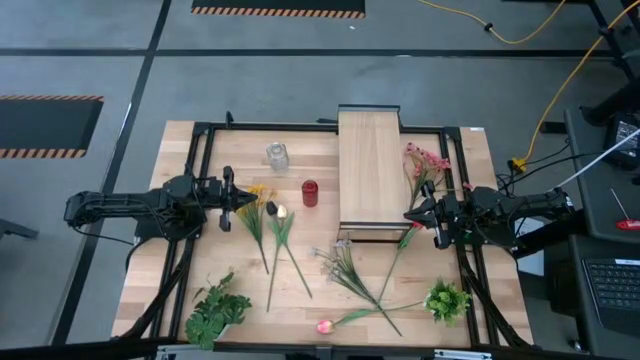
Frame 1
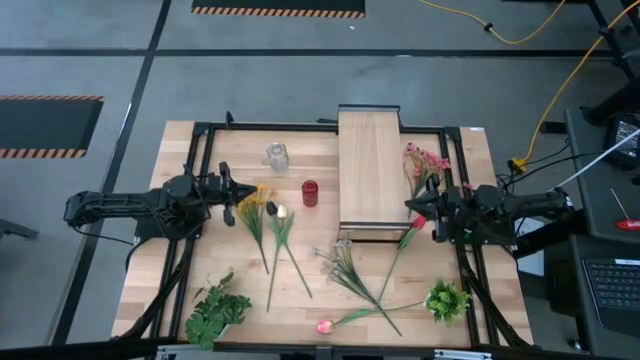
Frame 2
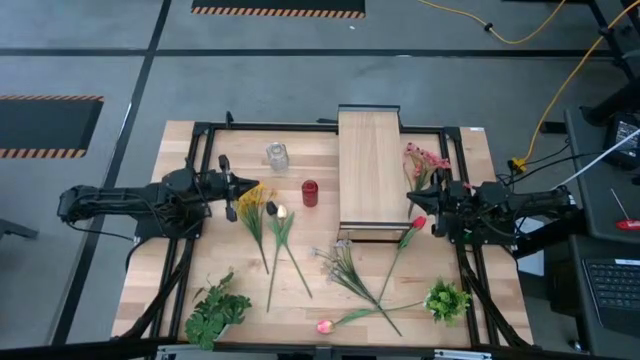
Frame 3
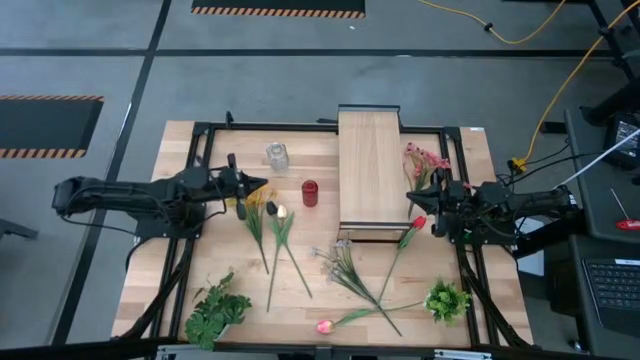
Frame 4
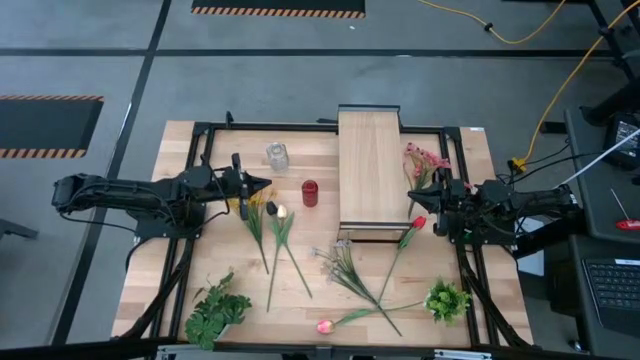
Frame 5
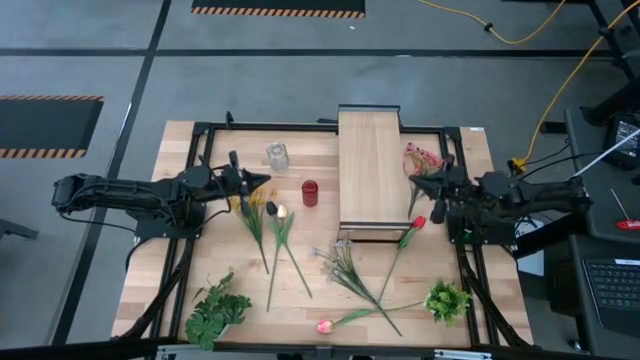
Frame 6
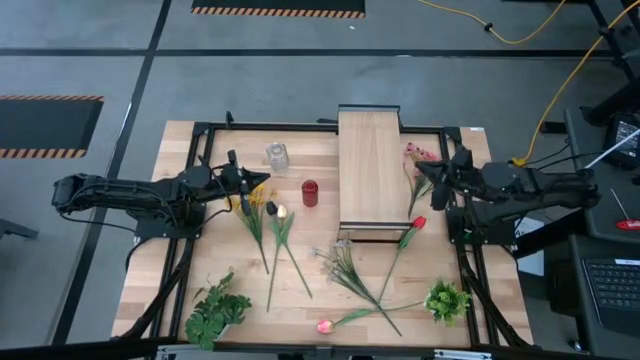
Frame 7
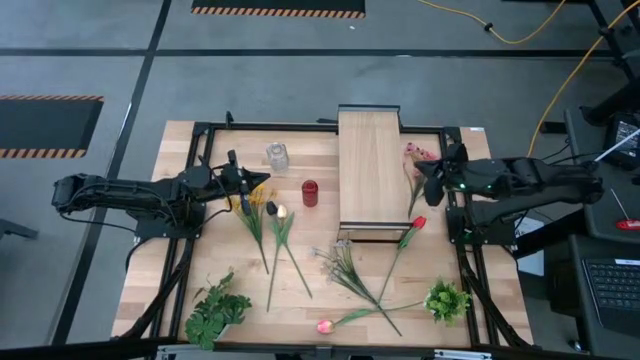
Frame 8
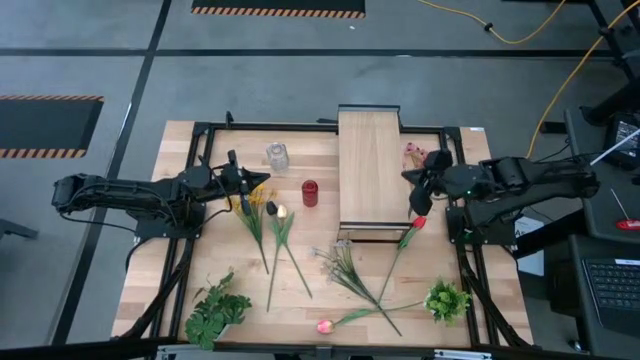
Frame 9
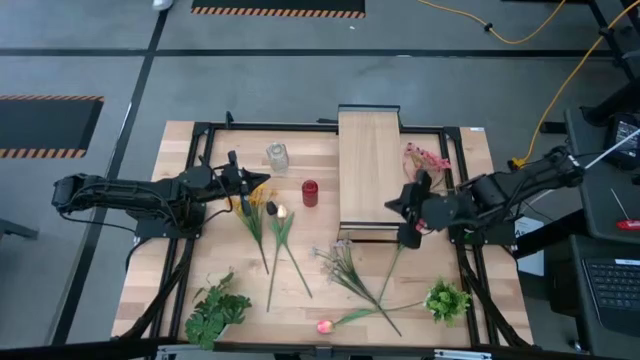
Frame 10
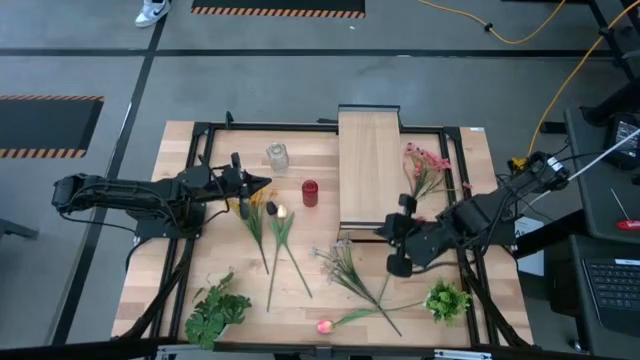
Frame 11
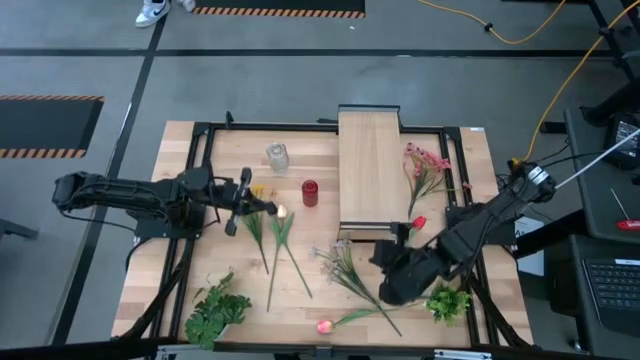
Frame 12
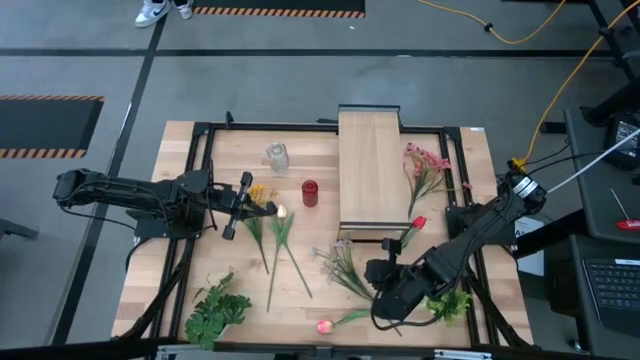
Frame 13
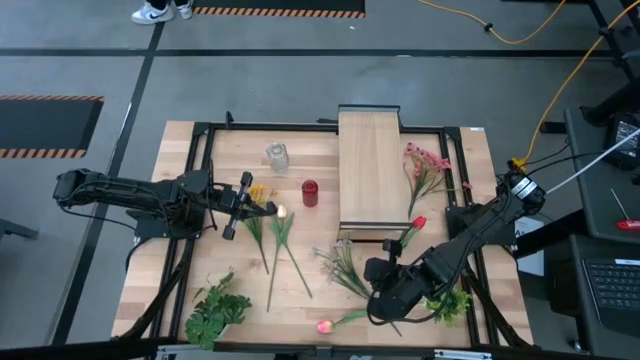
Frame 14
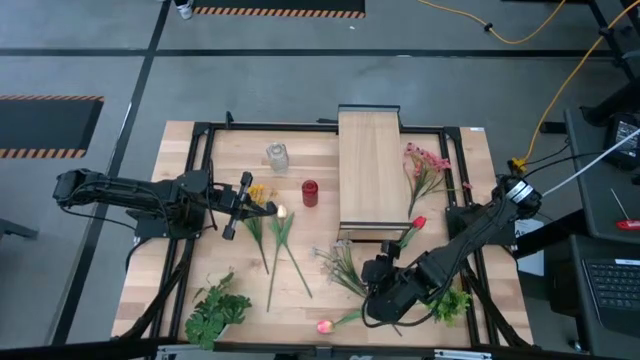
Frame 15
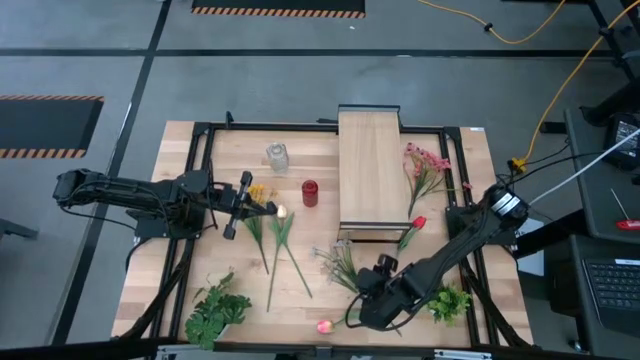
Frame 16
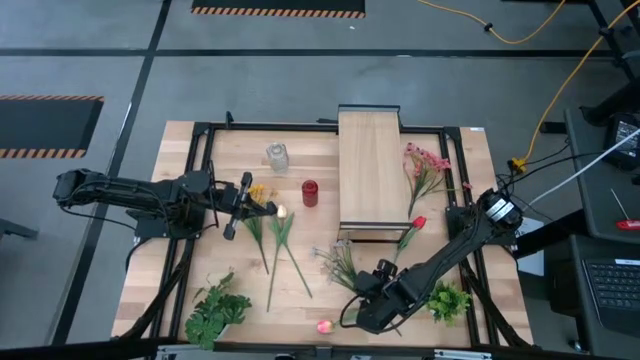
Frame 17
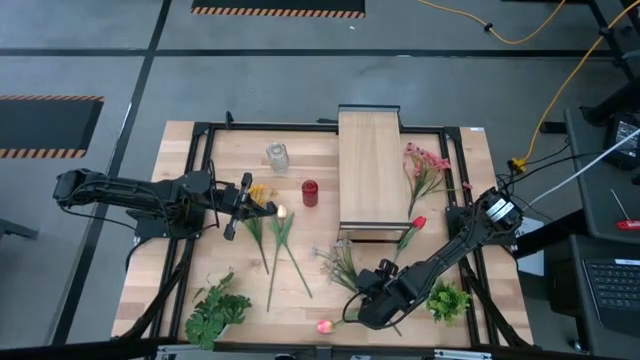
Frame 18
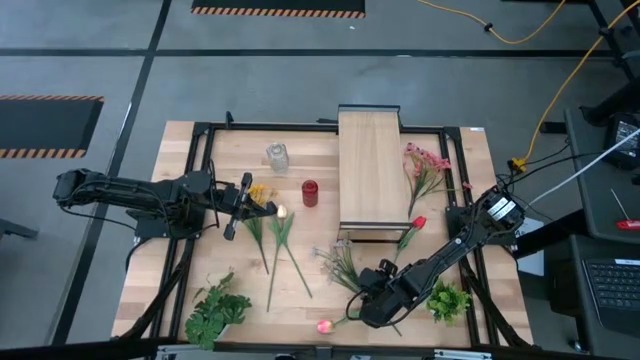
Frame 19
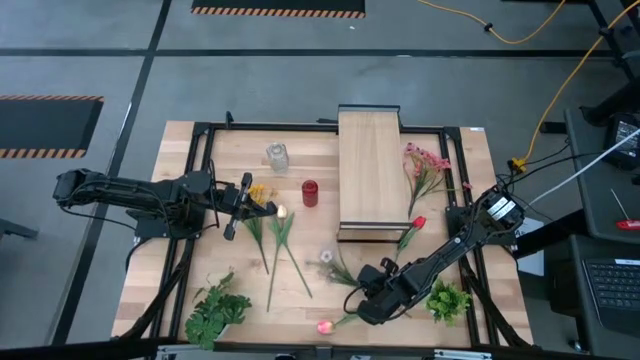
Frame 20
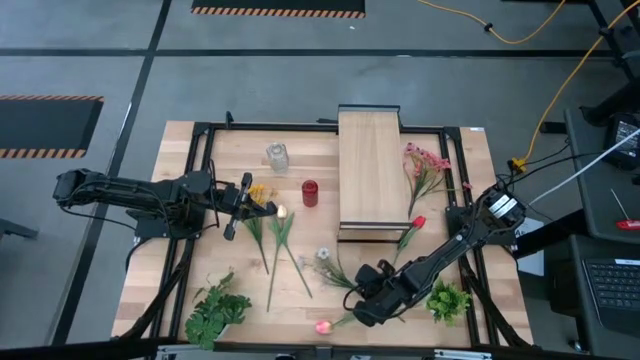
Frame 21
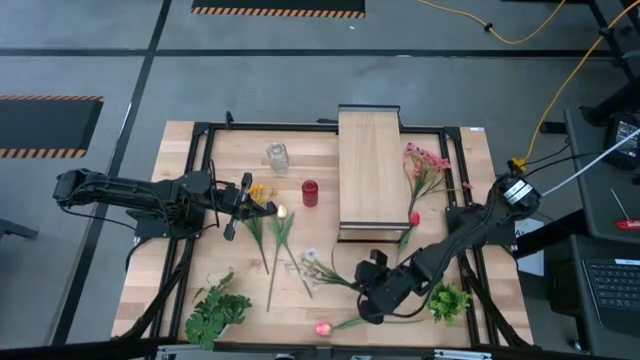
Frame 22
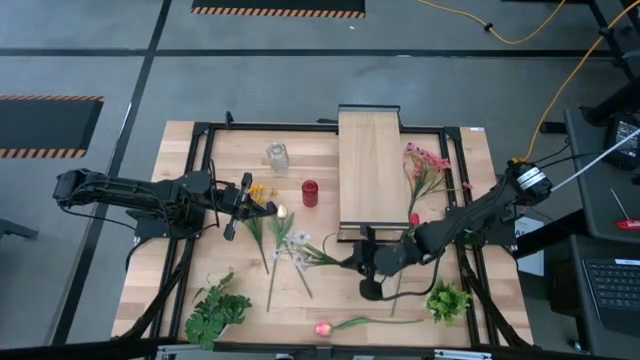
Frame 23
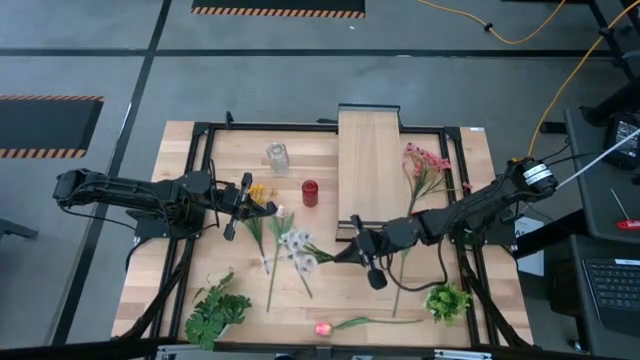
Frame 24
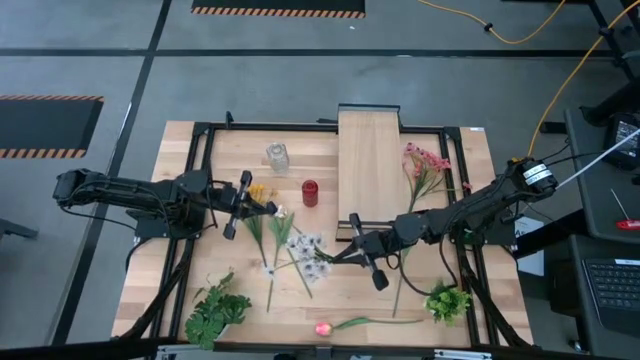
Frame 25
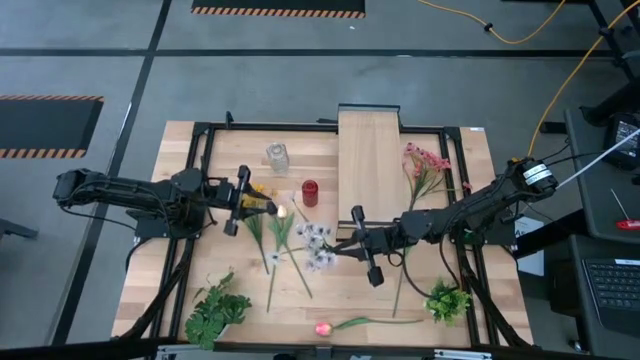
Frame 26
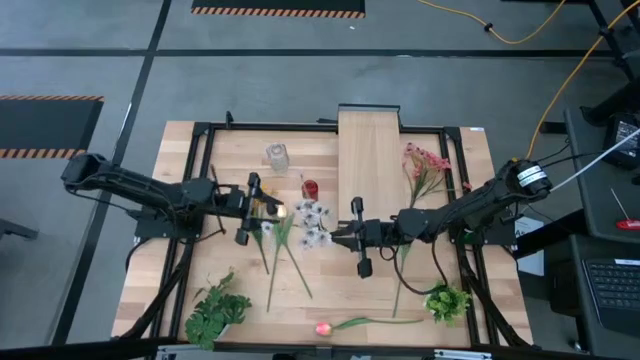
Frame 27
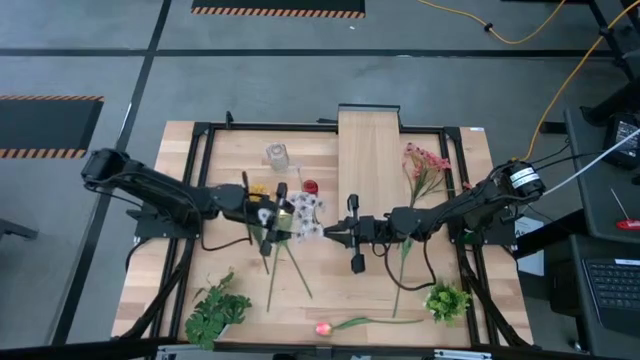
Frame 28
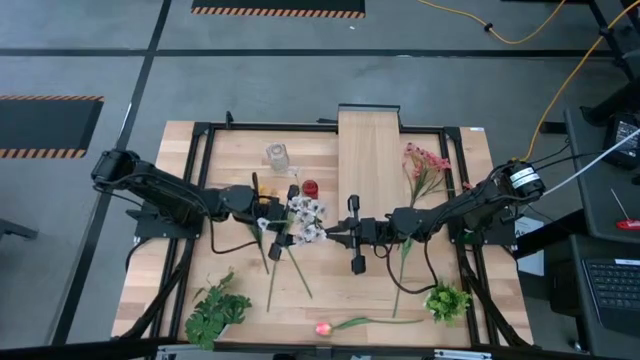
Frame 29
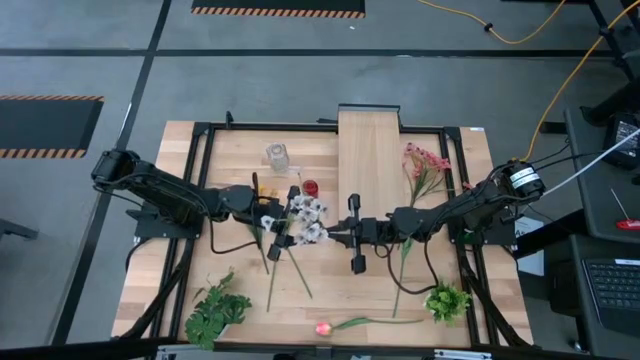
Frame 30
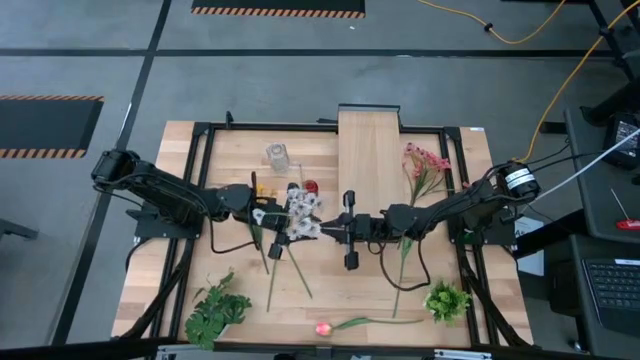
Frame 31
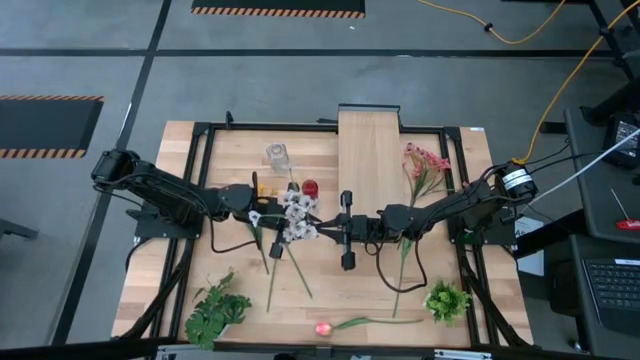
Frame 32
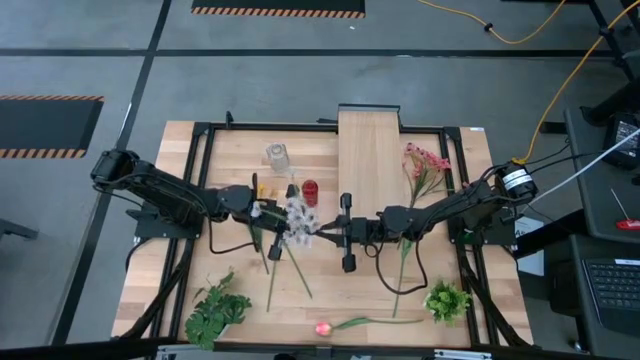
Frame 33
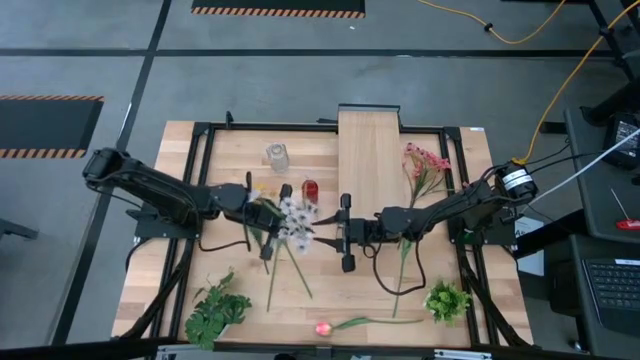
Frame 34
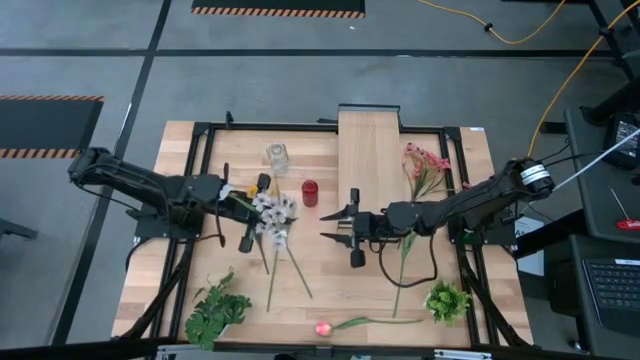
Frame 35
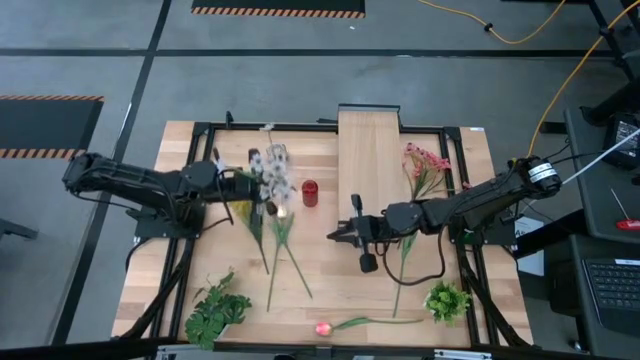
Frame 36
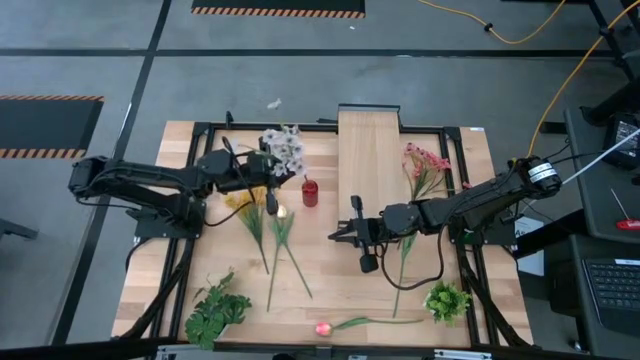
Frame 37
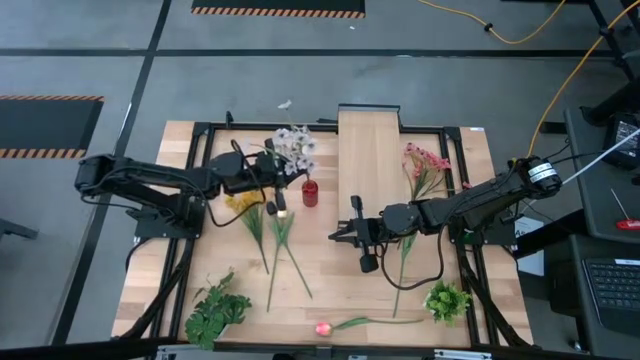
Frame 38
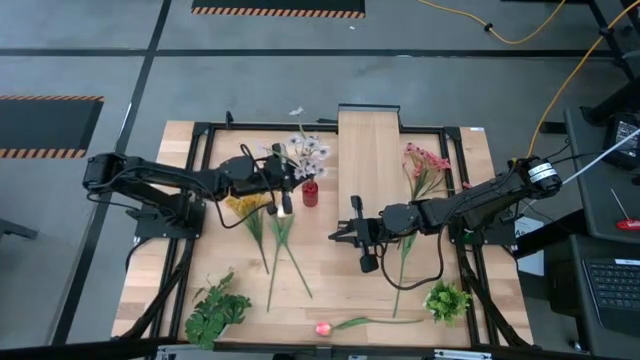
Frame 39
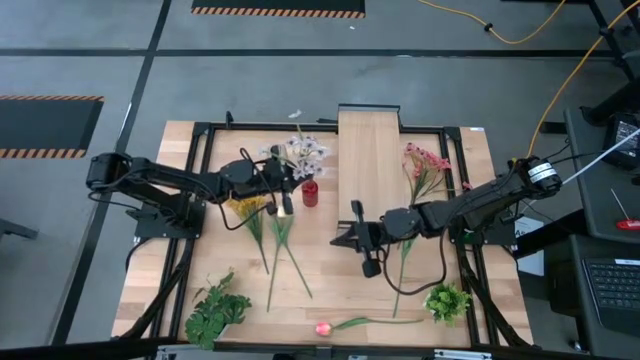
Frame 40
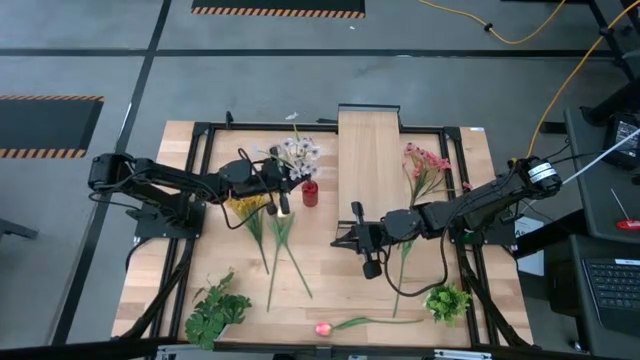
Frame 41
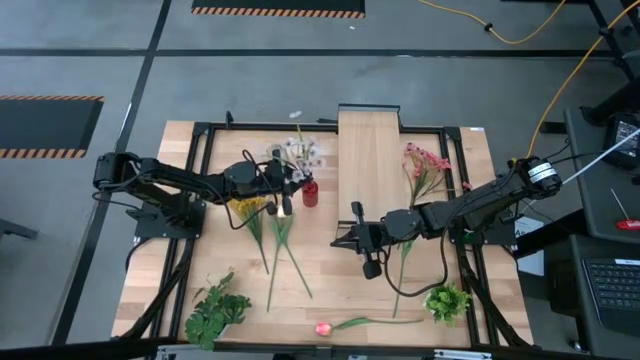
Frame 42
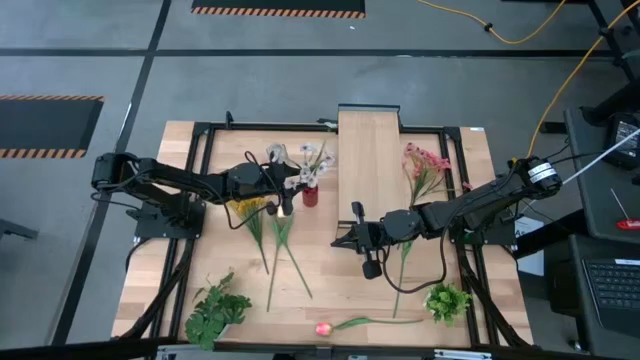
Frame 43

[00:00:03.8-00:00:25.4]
Task: Pick and place flowers into a vace then onto a shelf
Put the white flowers into the red vase
